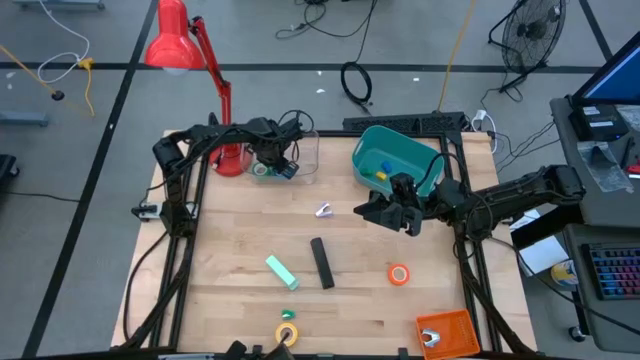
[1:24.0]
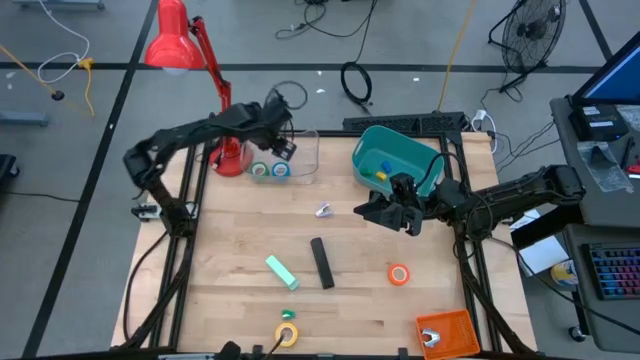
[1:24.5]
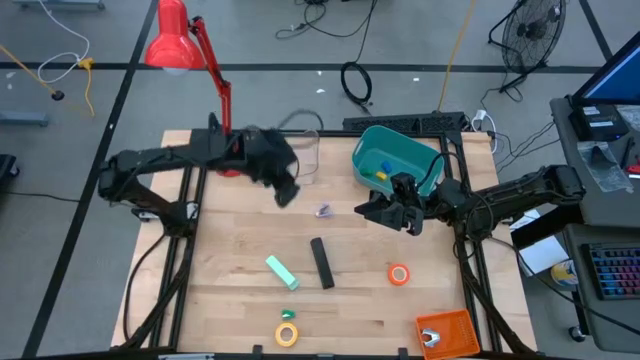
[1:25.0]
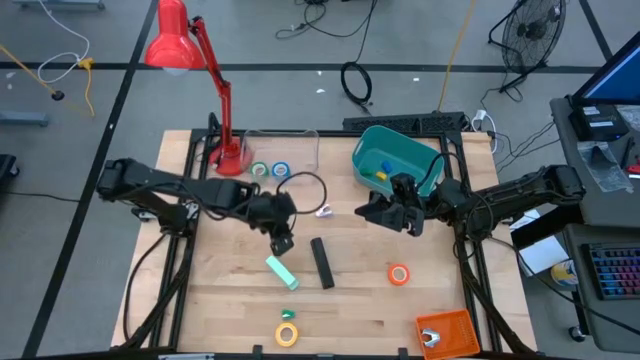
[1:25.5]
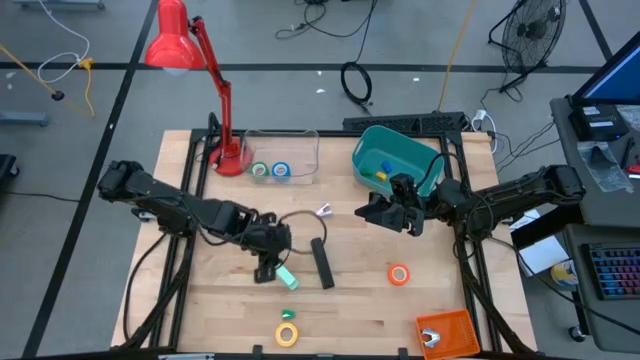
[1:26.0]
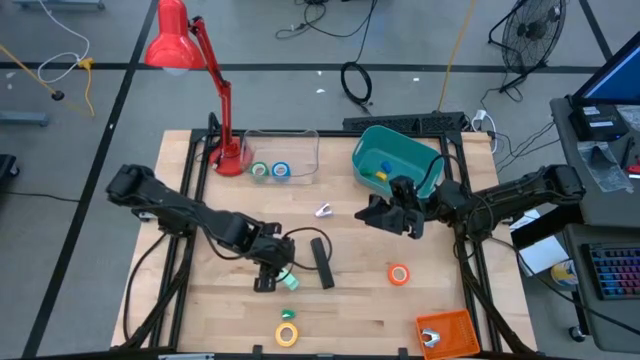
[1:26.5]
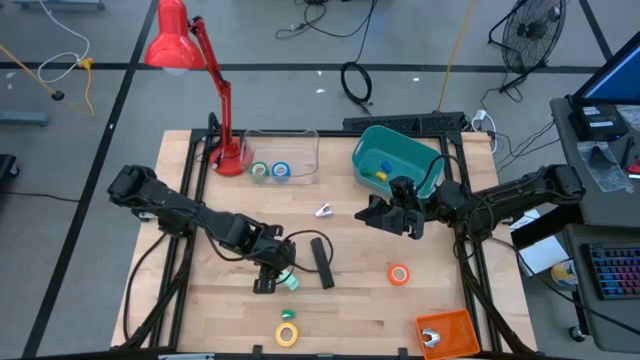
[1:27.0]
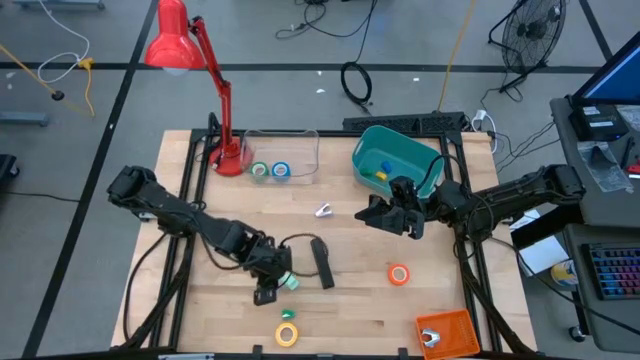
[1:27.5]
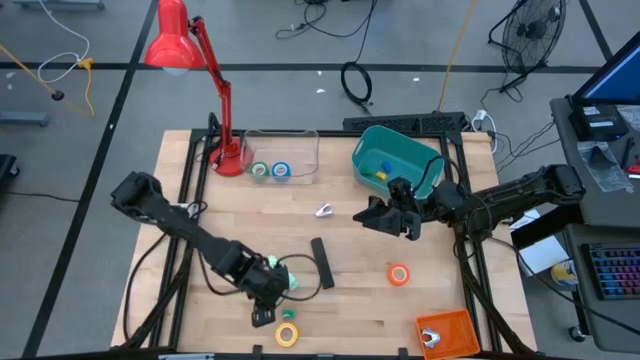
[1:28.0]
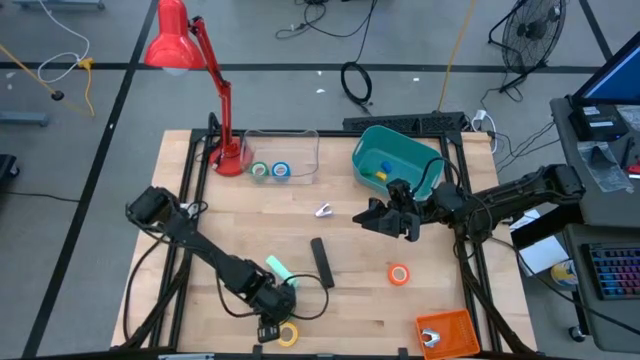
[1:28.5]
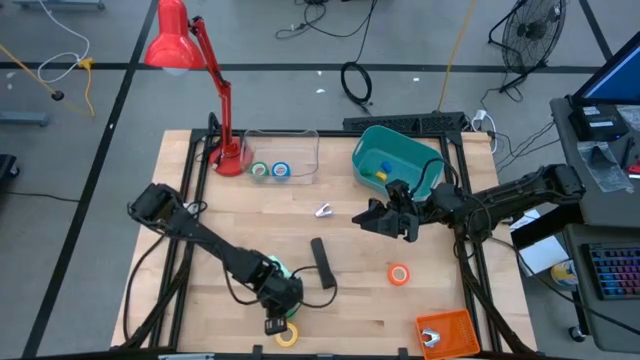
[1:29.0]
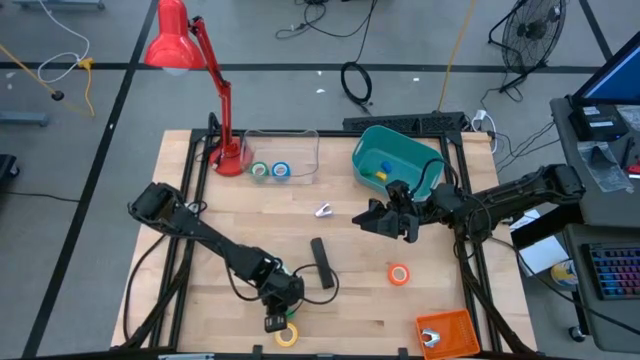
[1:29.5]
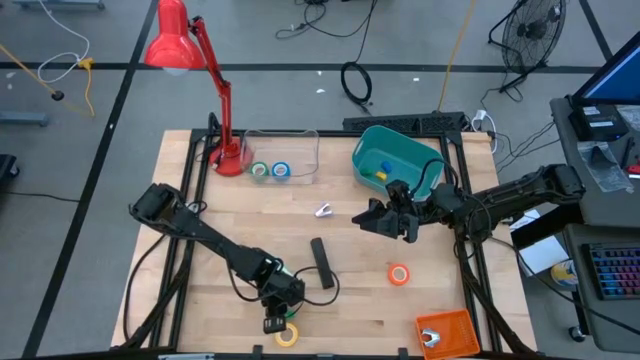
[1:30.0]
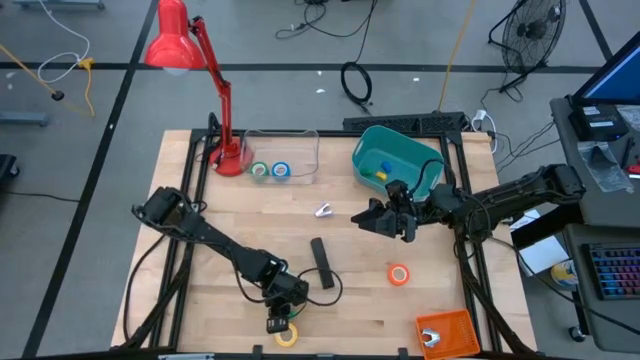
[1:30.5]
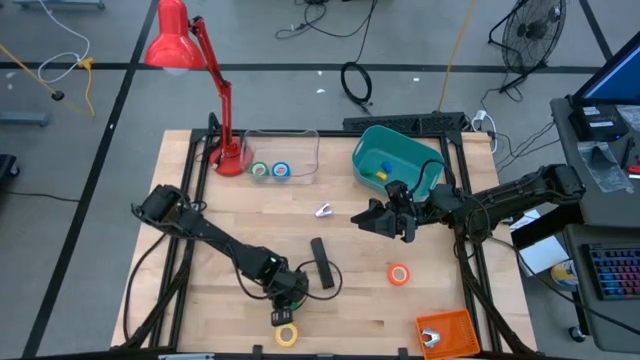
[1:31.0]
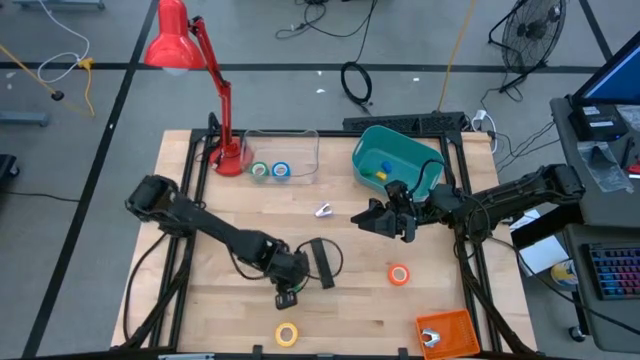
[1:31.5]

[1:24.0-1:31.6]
Task: Pick and place Stapler, Stapler remover, tape
Move the green stapler to the center of the table

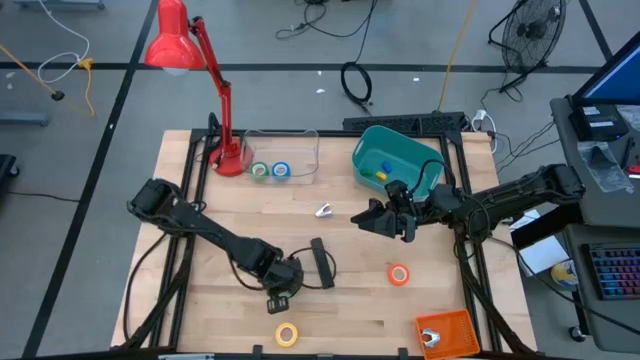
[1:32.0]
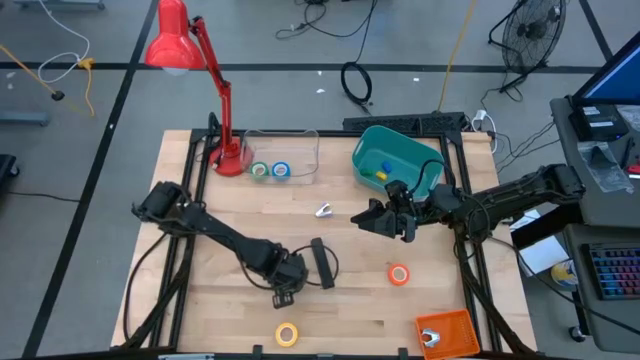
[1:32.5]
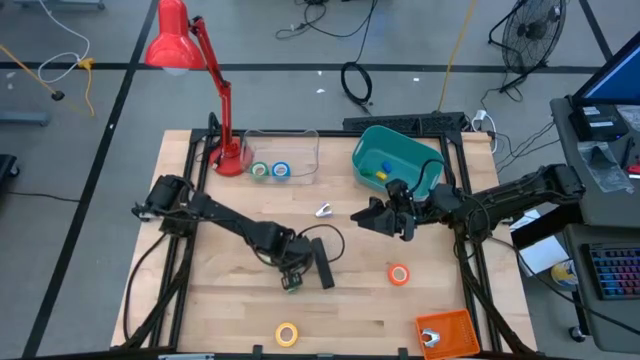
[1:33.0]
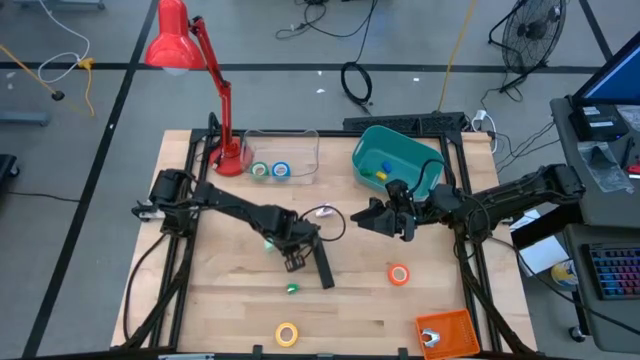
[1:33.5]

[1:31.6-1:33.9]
Move the light green stapler to the center of the table

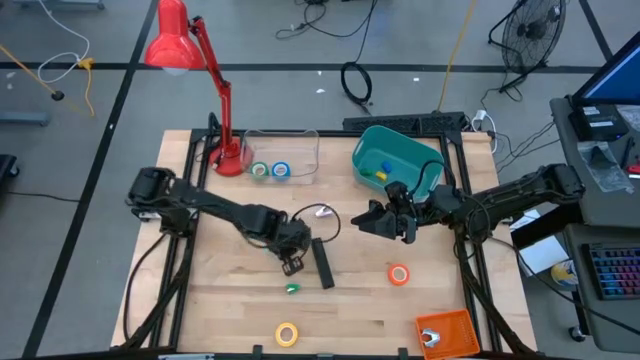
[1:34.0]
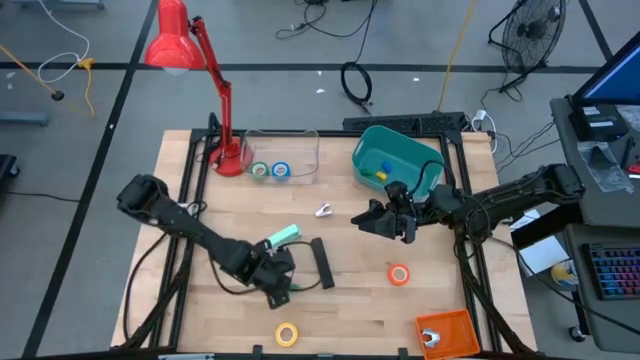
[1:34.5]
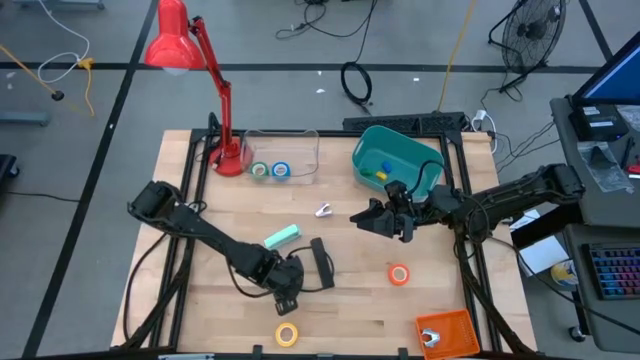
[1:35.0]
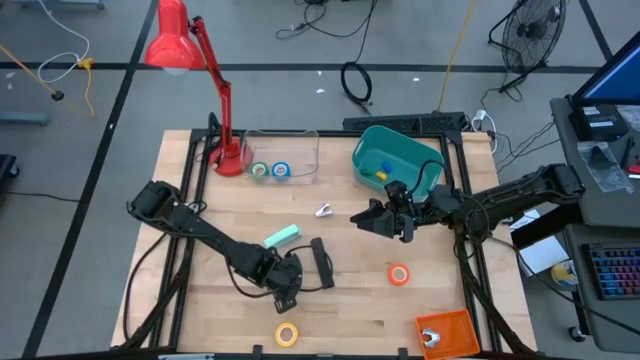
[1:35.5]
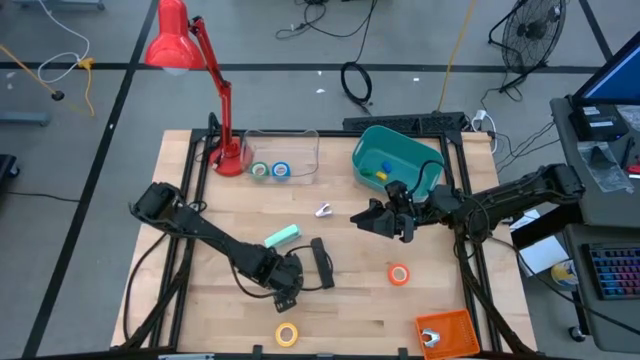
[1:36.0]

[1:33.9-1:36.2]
Put the green stapler into the green bin

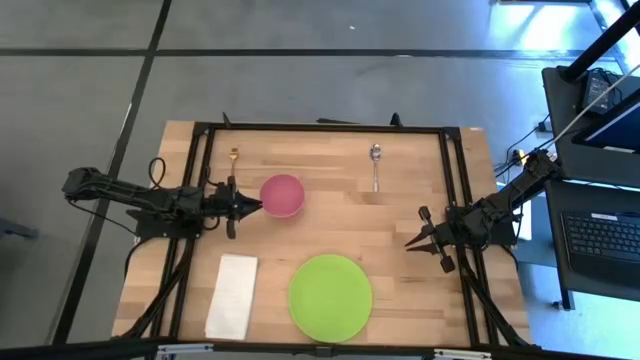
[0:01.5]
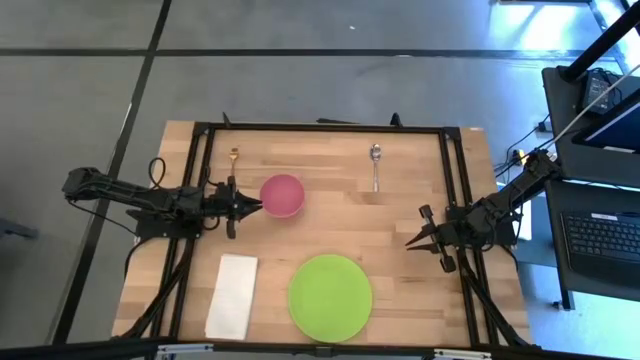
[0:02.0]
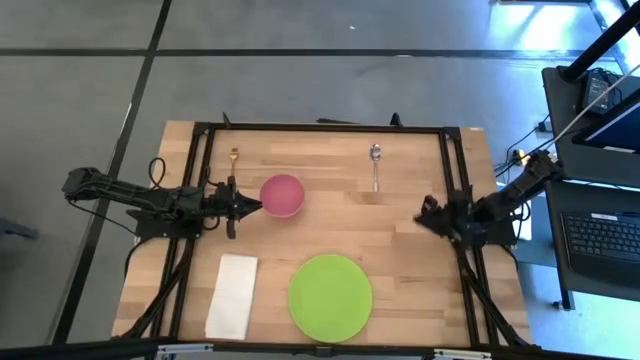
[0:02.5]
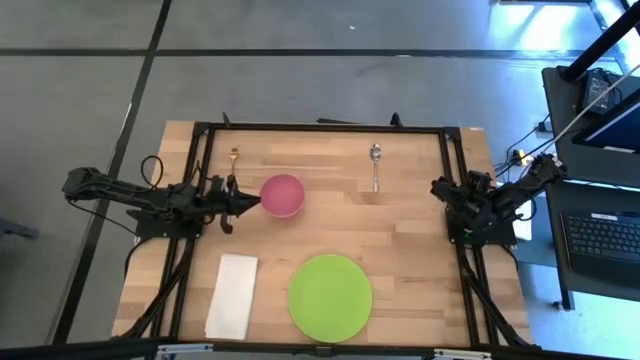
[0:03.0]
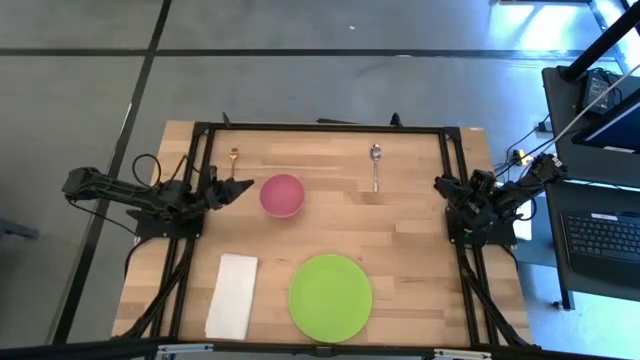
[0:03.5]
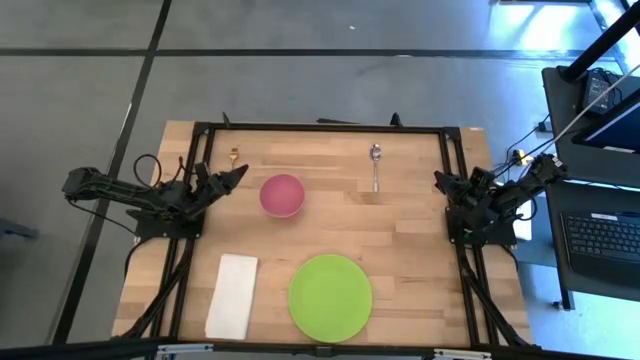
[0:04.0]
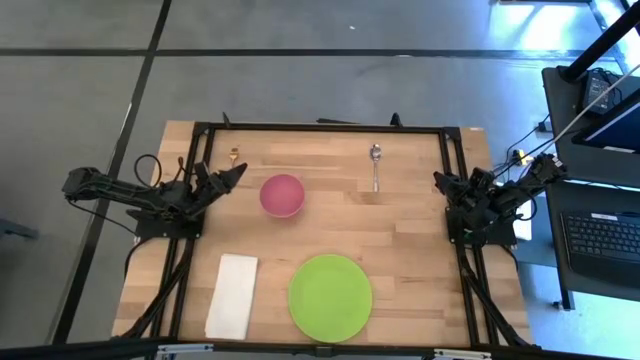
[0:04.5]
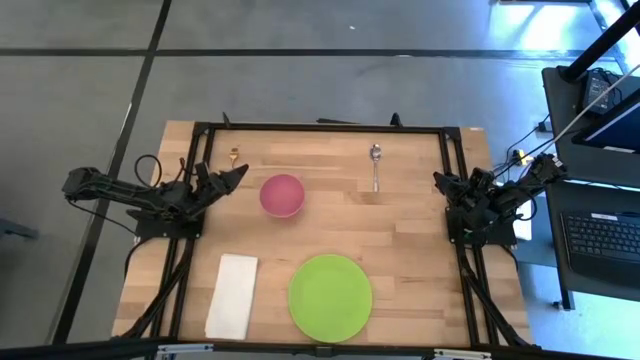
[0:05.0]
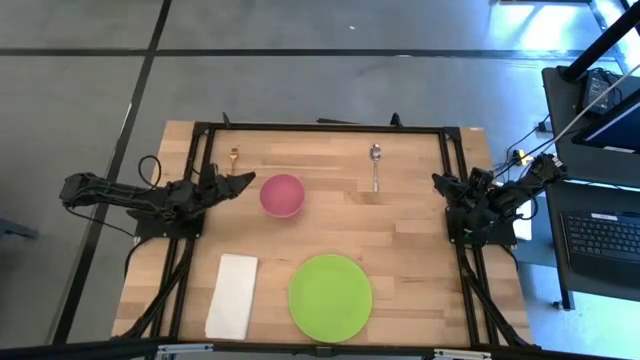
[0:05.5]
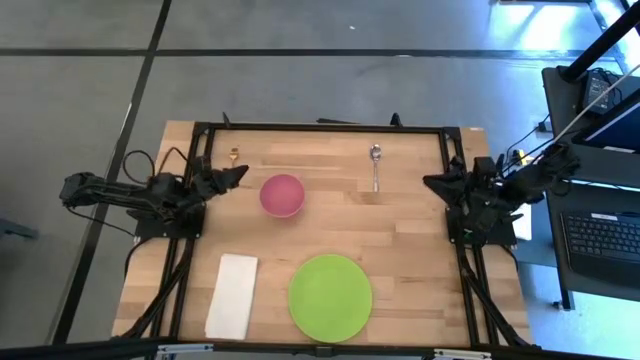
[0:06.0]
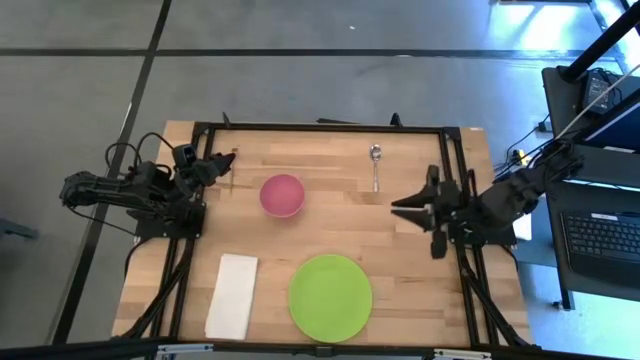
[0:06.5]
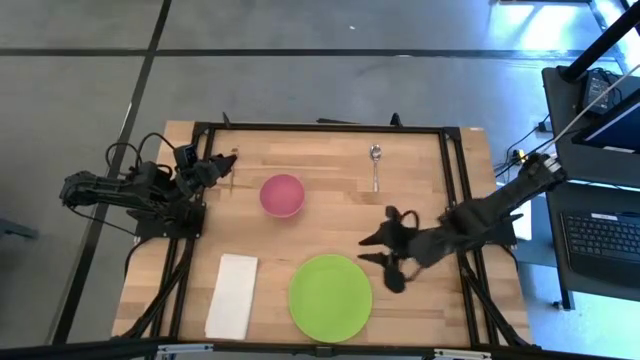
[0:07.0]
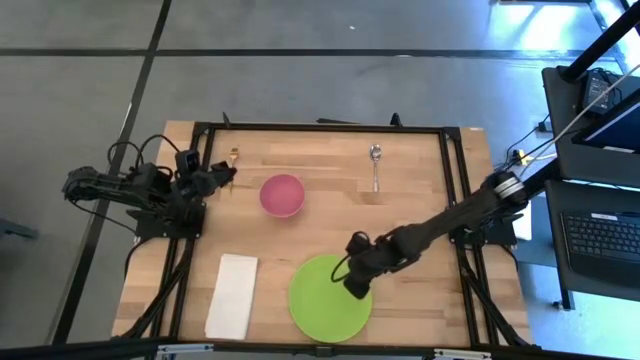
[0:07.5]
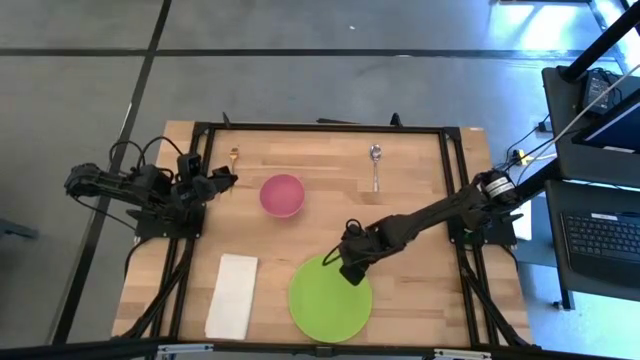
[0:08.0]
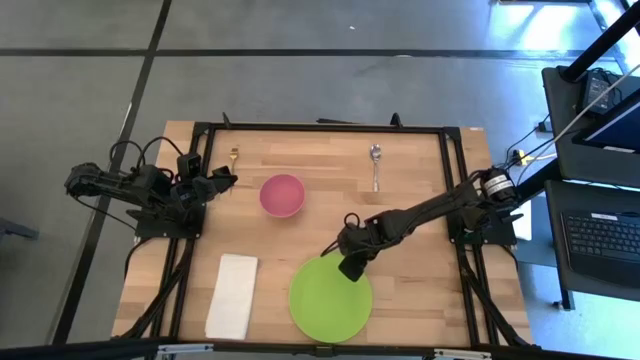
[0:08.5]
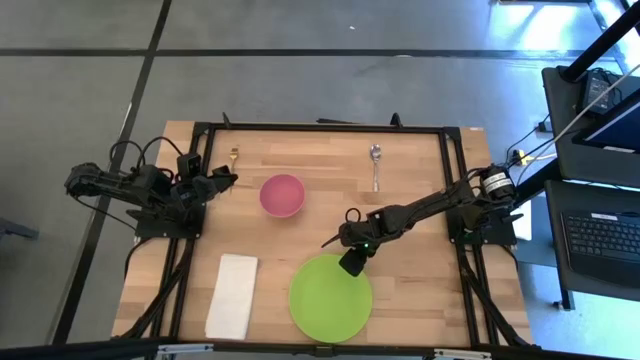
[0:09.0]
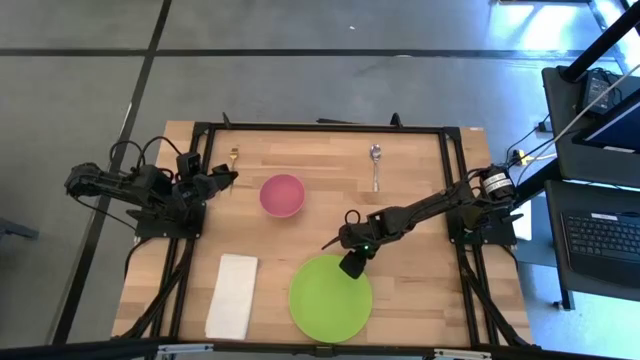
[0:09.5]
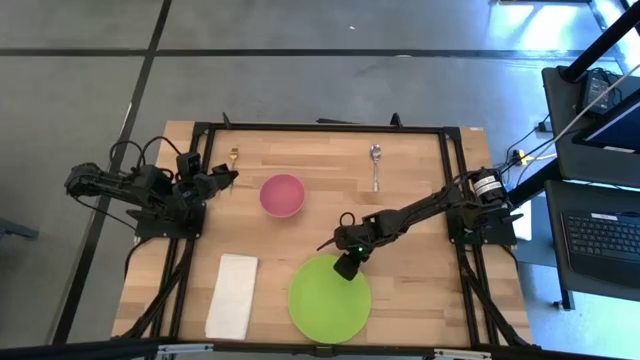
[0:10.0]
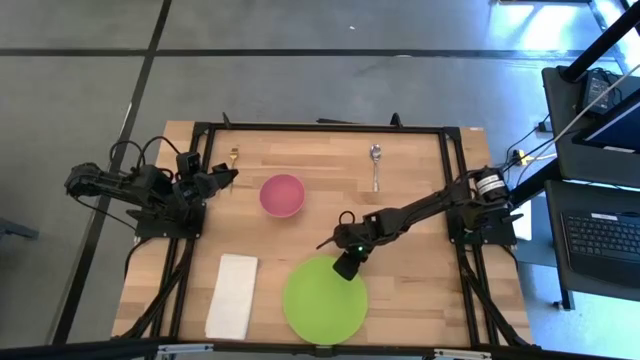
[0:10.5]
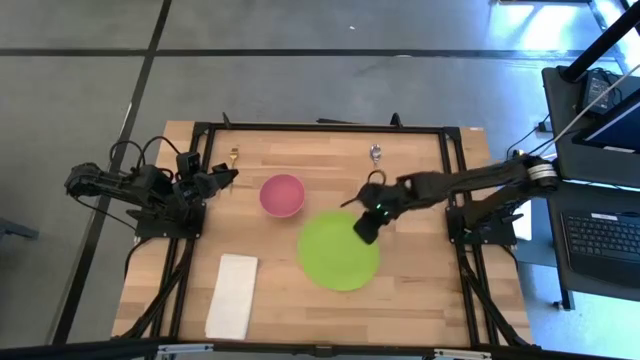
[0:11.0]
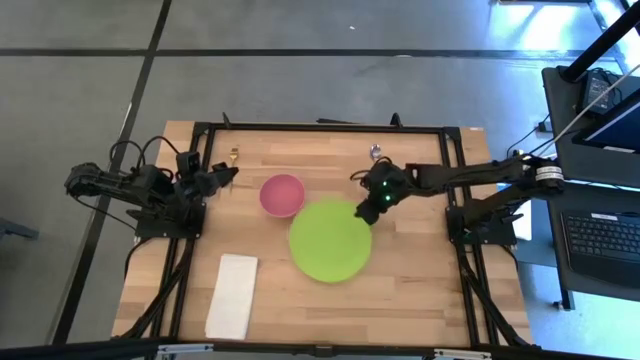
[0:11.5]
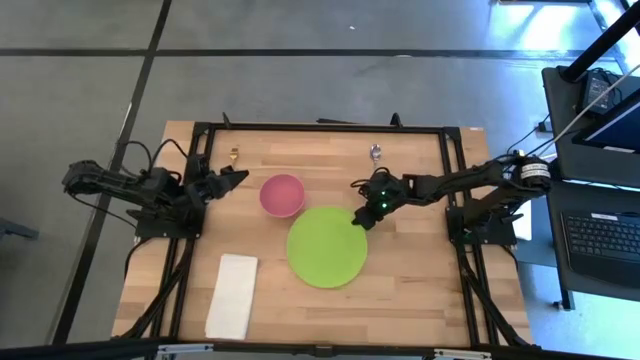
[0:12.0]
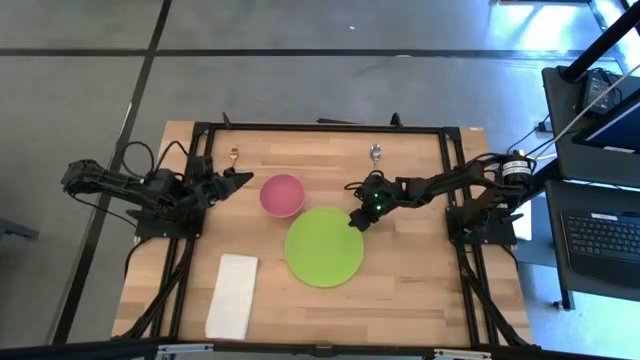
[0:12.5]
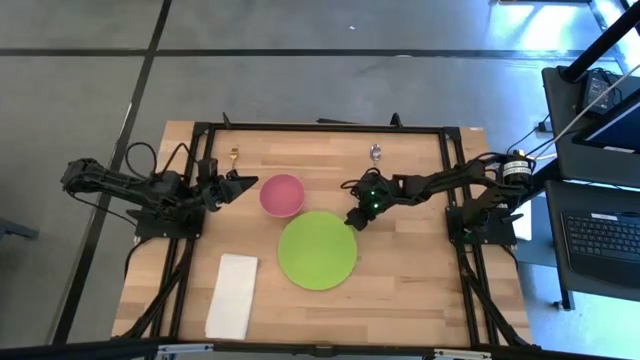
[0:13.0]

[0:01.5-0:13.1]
Task: Set table place
Move the green plate to the middle of the table
